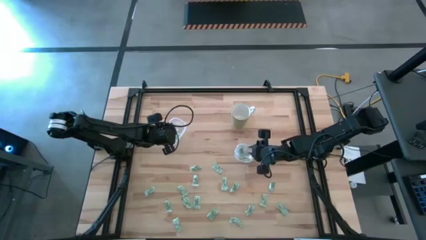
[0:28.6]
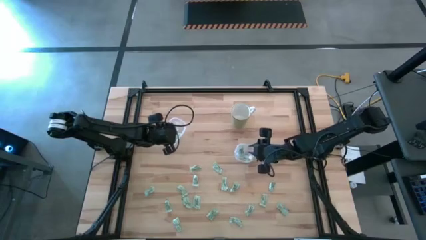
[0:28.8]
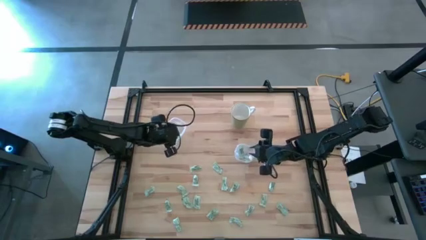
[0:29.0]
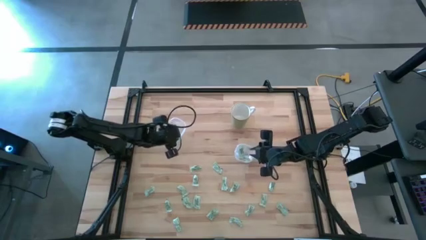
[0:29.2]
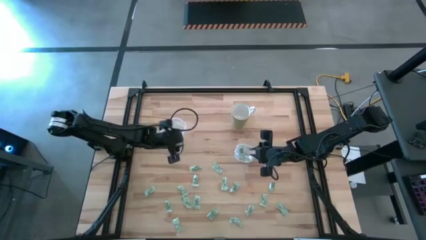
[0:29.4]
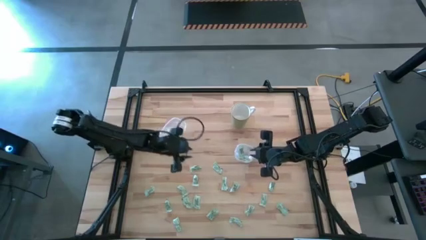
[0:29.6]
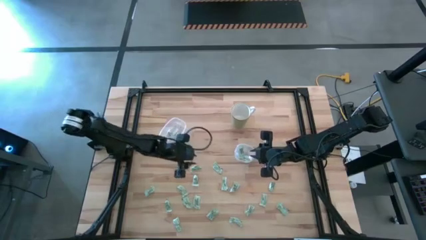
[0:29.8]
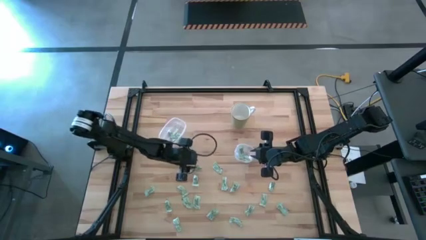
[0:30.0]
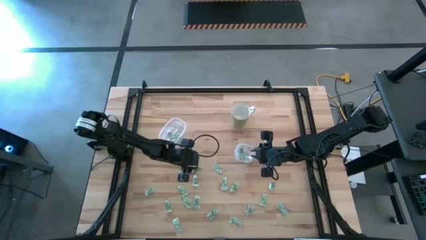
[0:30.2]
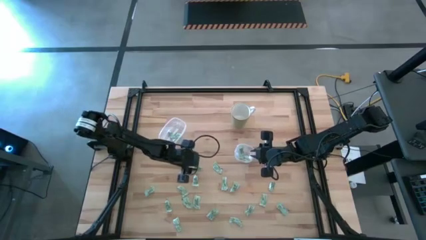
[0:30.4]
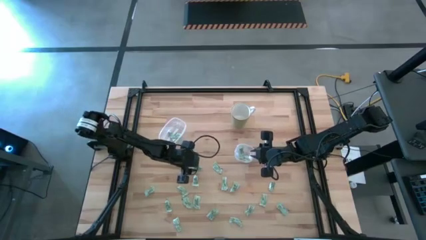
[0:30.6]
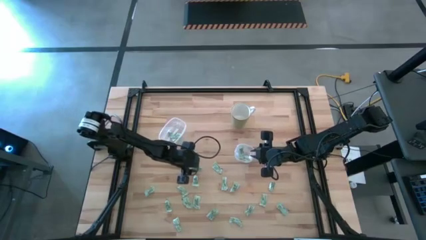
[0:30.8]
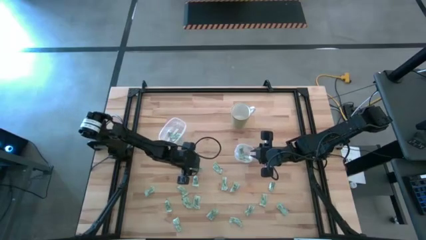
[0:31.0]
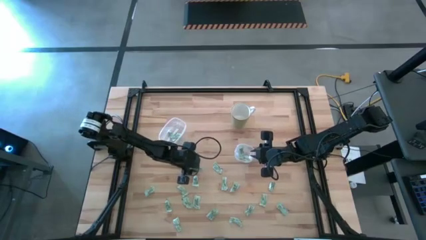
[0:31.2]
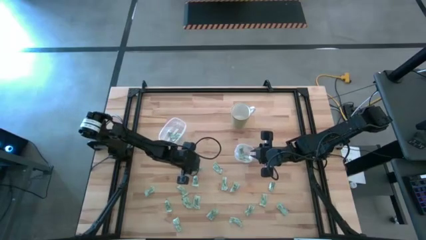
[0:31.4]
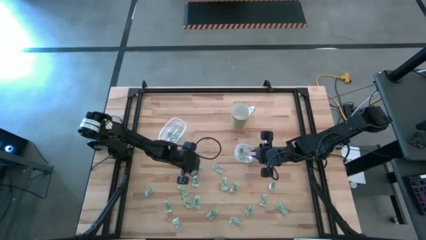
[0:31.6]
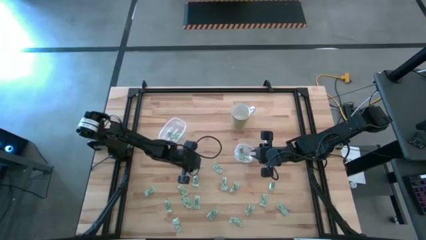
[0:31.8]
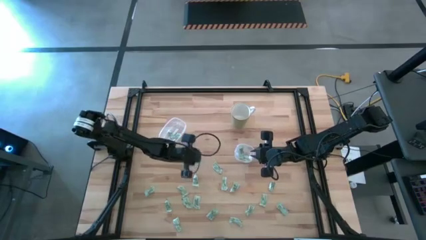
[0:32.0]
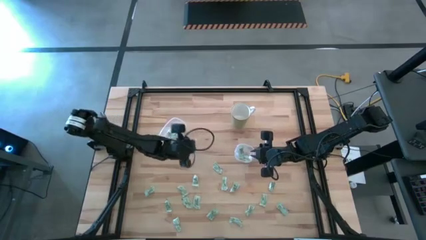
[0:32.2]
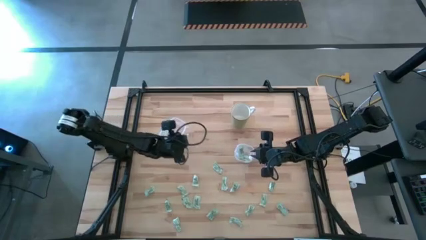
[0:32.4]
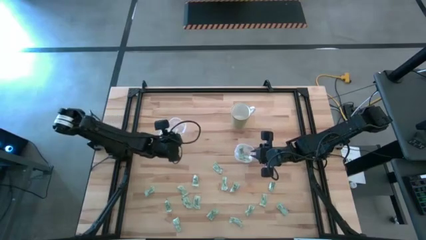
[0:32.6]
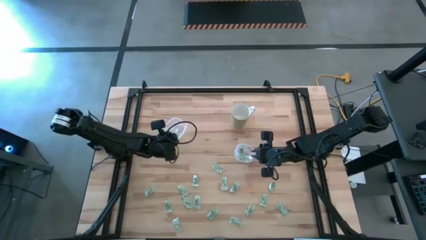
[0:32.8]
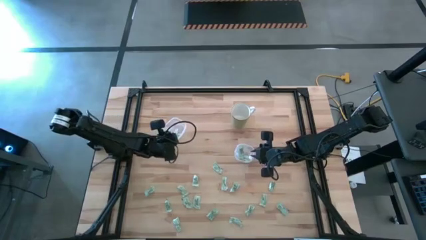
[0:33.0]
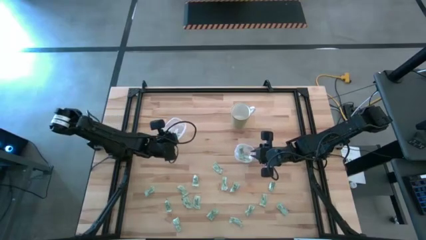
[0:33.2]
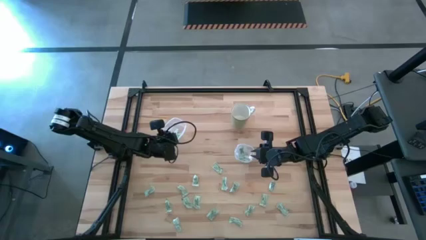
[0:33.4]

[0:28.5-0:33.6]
Task: Pick and place Stevia / Truvia into bins
Put the stevia packet into the left transparent container

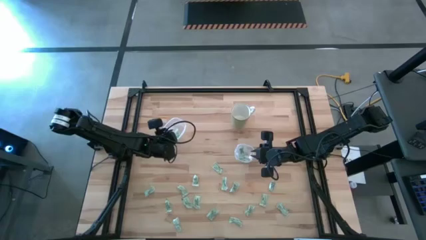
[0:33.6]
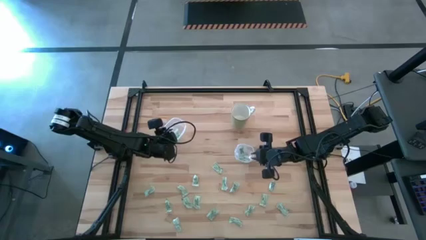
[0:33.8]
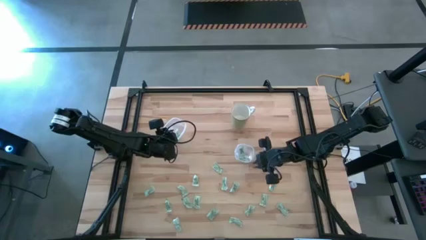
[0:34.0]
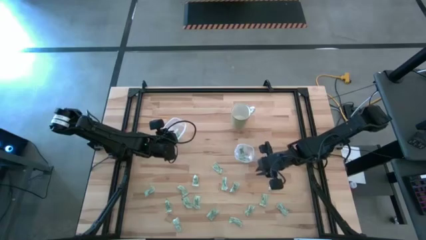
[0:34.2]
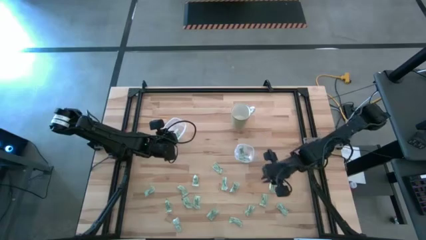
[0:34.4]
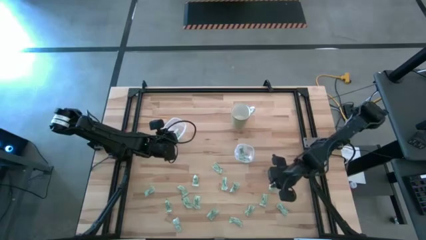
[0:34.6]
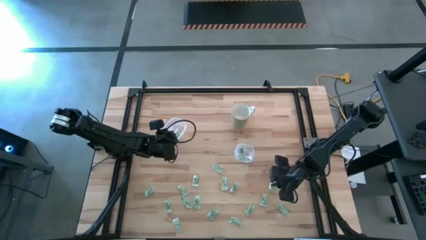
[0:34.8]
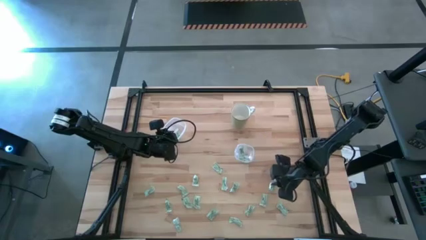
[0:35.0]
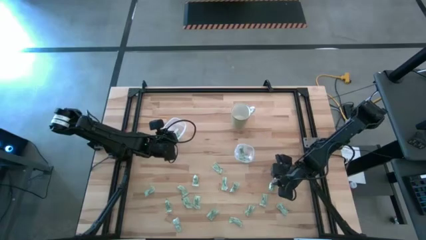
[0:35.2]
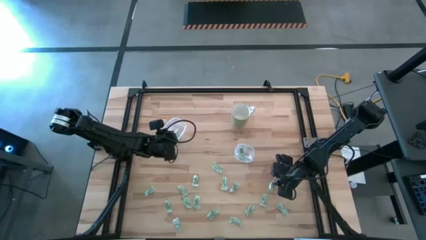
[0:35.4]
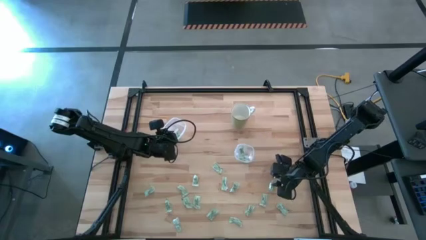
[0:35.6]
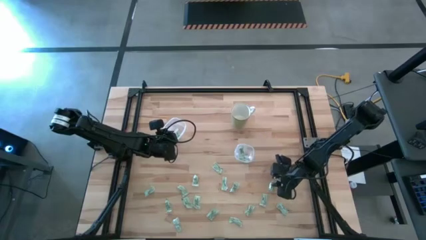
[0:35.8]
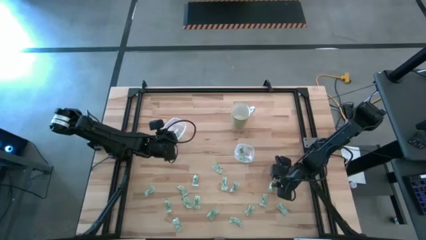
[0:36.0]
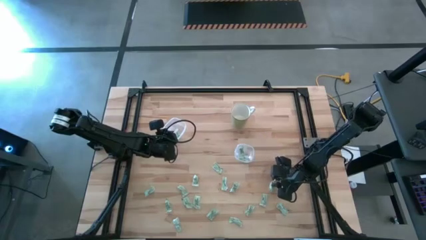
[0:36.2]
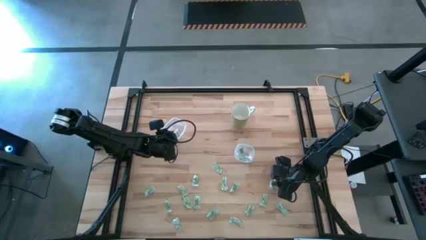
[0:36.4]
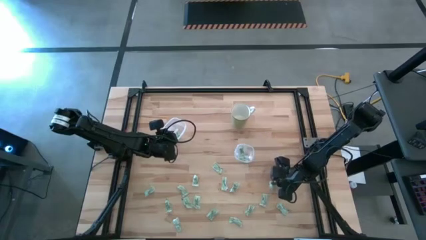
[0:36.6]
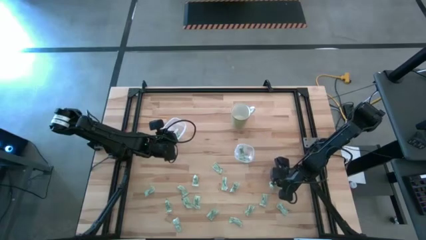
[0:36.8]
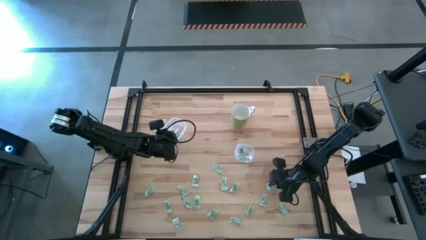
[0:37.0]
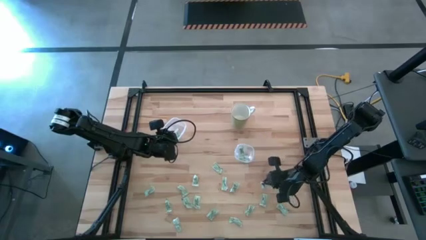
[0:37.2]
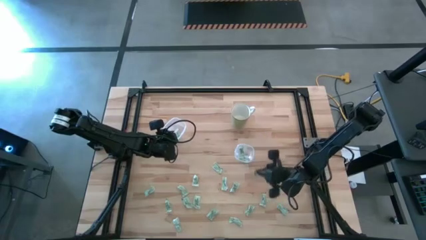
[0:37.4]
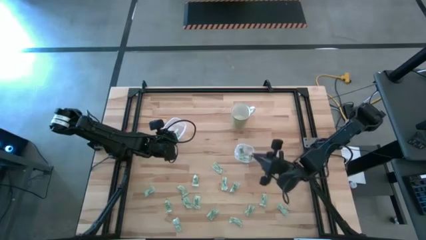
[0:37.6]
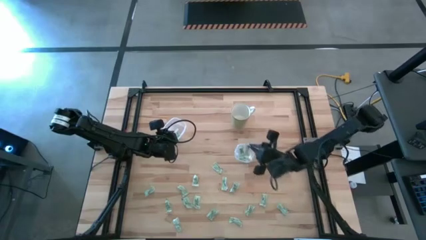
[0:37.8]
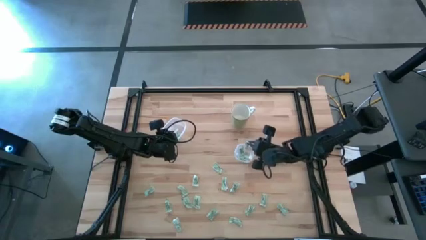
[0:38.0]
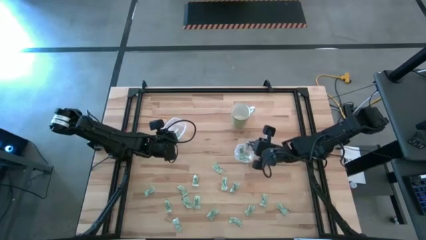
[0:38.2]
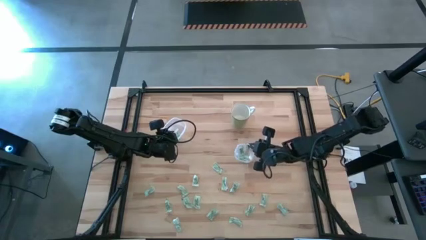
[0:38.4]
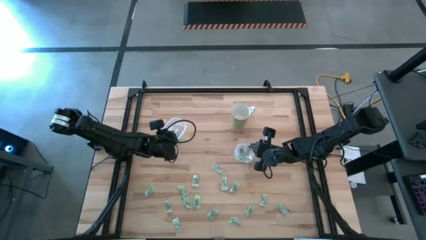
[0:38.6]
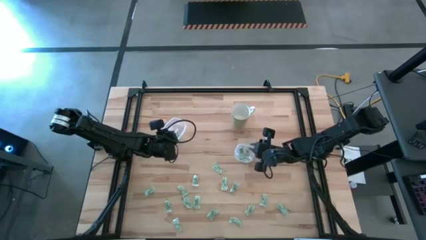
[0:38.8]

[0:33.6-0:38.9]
Put the stevia packet into the right transparent container

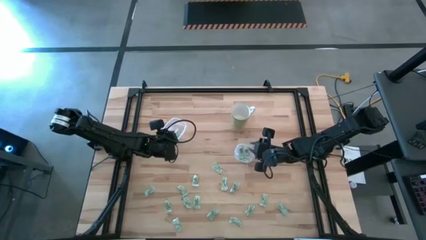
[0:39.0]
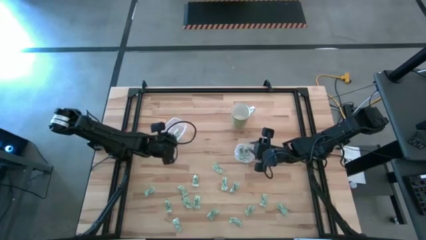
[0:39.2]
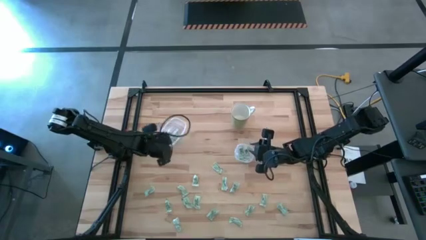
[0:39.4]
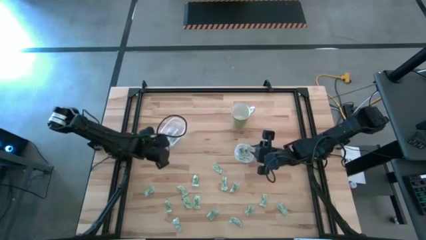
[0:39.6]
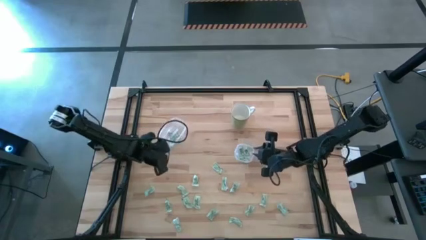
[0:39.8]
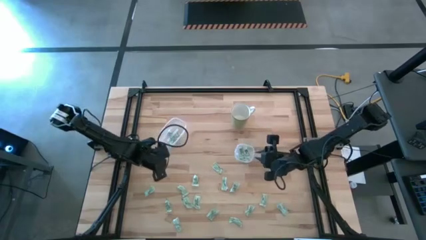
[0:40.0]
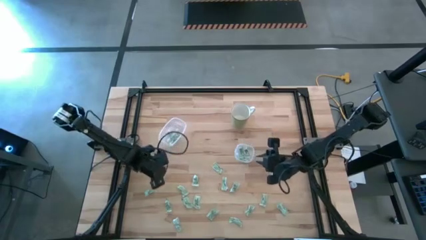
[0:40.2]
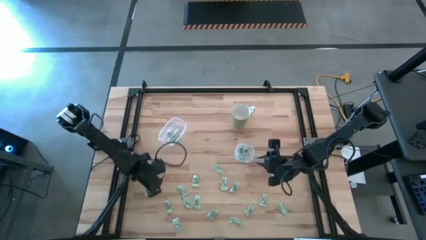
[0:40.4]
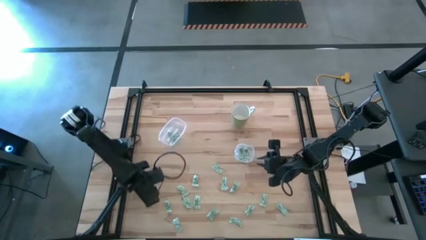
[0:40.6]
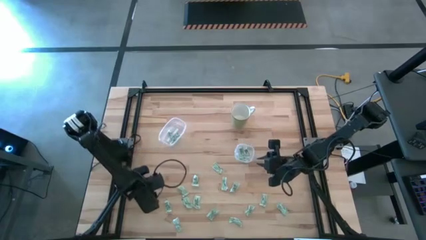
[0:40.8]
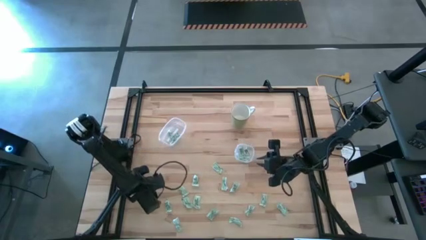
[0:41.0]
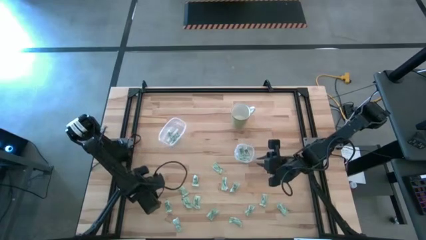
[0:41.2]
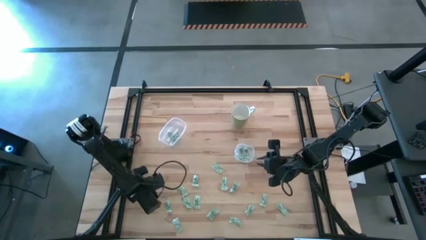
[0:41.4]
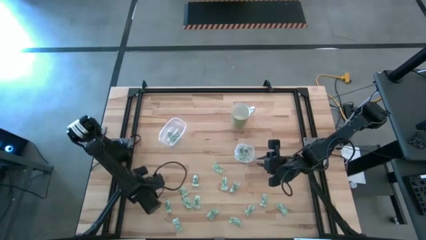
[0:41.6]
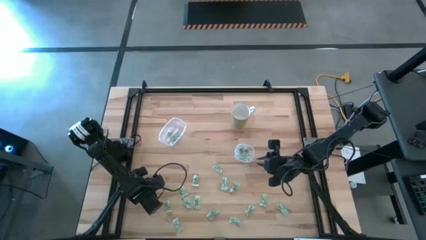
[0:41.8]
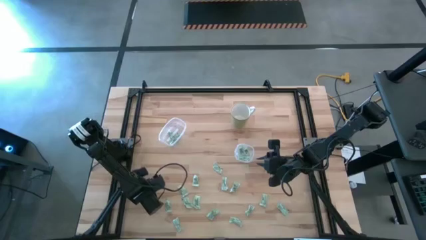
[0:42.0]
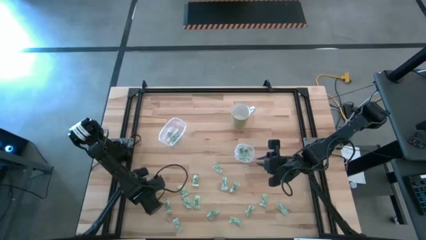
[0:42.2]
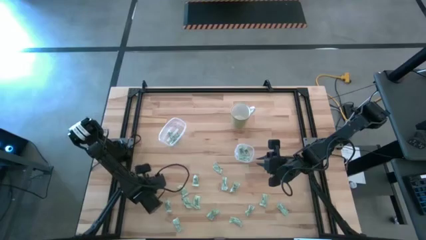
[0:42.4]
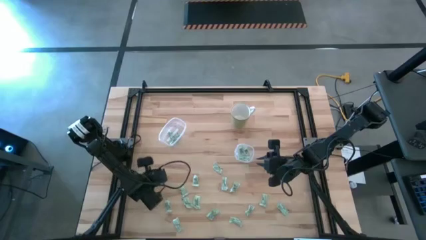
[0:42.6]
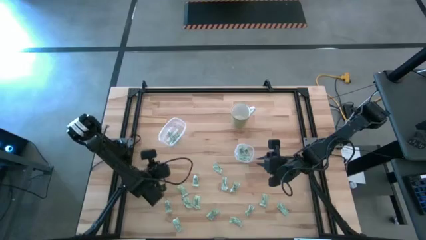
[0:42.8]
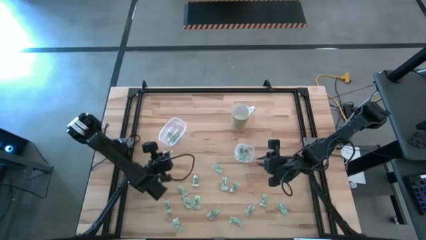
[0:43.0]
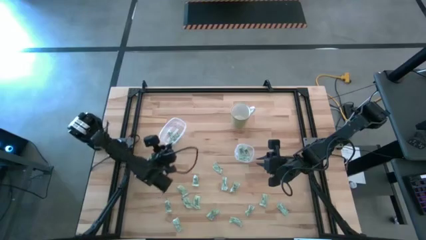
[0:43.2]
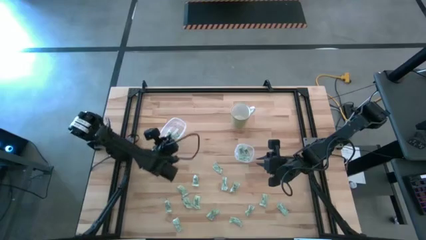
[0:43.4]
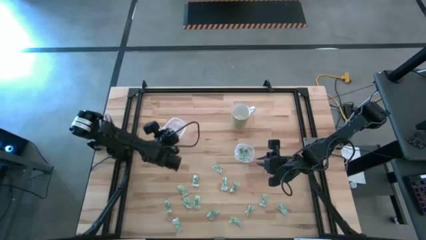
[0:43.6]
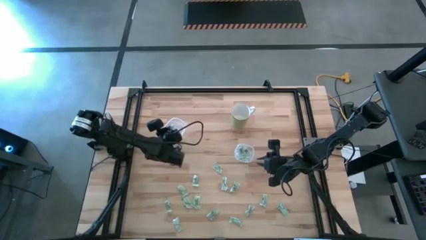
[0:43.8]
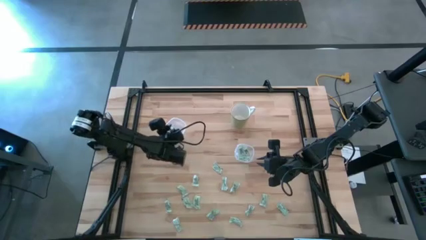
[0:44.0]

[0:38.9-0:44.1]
Put the stevia packet into the left transparent container

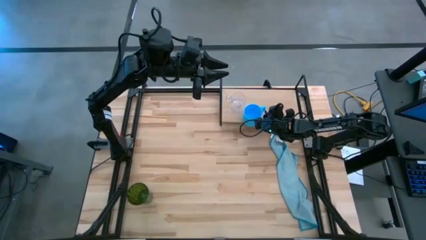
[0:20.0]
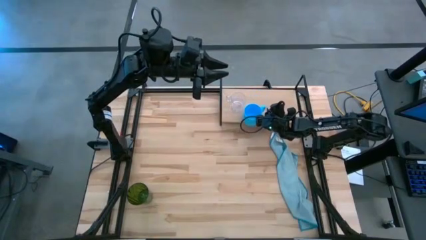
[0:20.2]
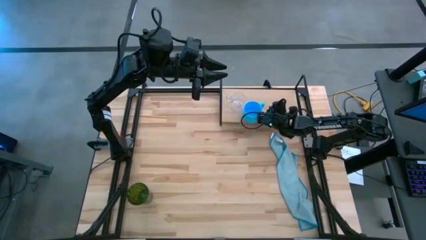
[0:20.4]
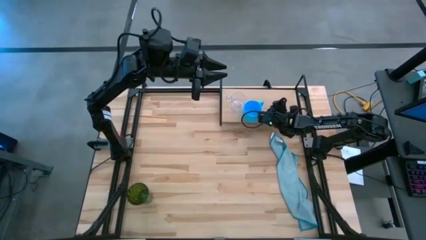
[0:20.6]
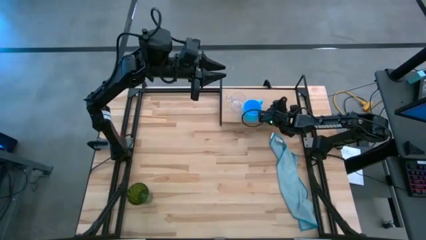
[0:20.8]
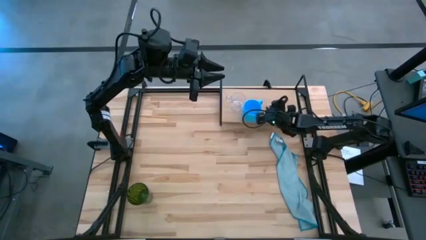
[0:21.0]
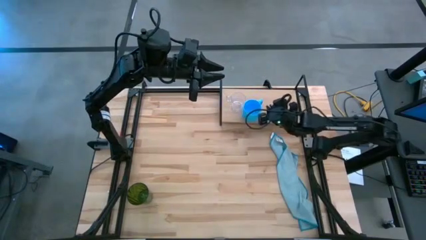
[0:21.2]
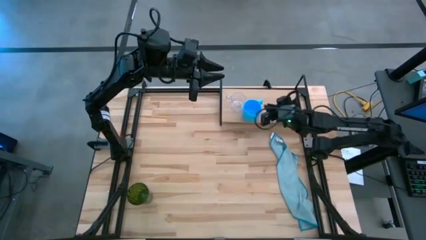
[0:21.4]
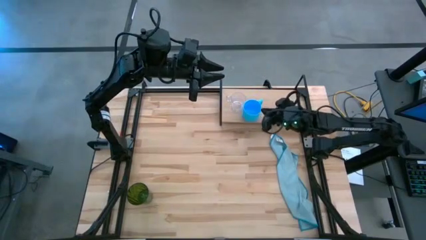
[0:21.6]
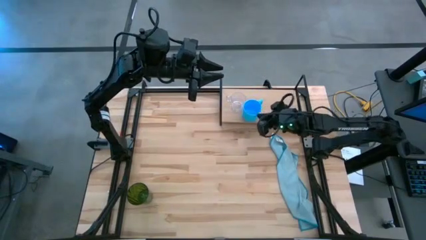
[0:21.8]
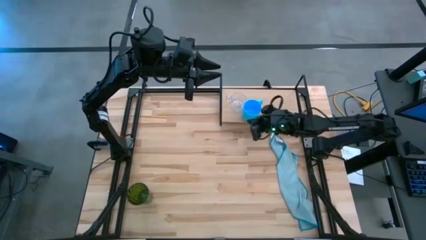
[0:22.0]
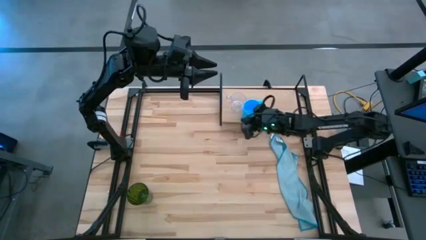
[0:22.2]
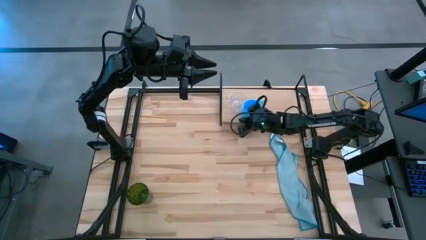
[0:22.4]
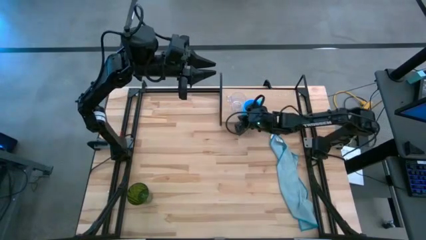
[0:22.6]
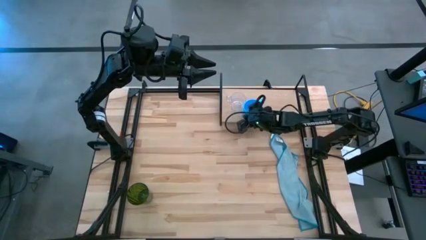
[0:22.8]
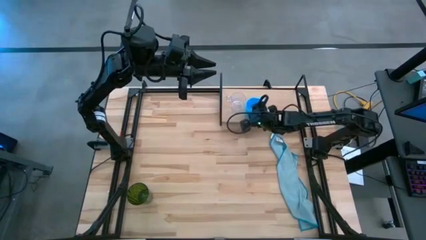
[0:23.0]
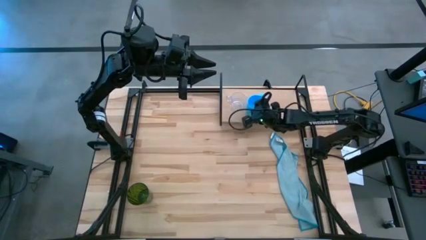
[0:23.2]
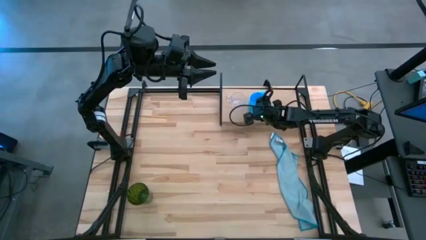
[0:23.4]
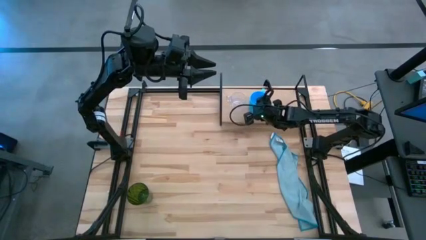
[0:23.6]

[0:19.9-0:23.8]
Task: Stack small to large cups/mugs on shelf
Adjust the blue mug on the shelf
